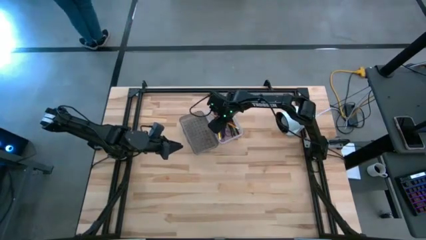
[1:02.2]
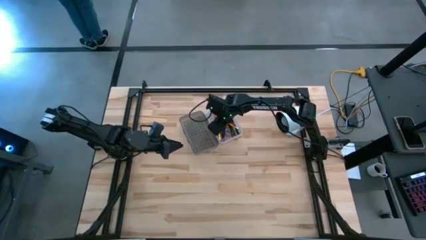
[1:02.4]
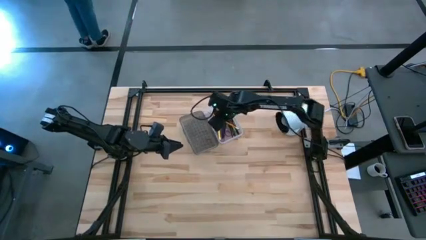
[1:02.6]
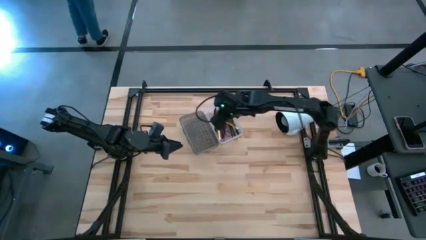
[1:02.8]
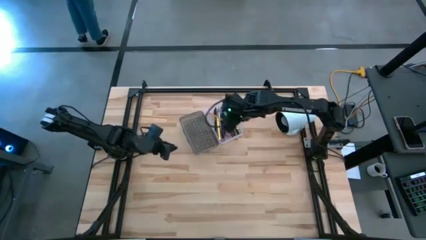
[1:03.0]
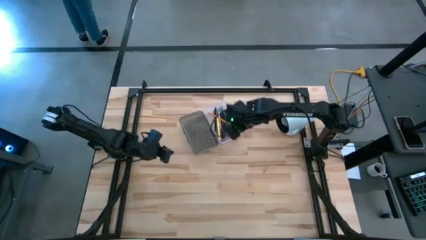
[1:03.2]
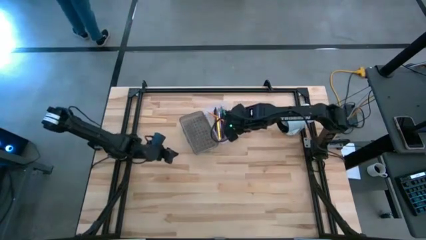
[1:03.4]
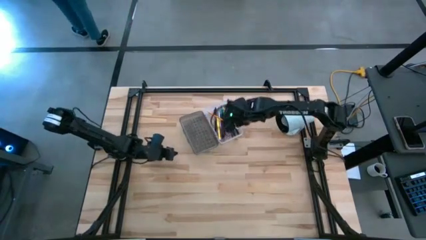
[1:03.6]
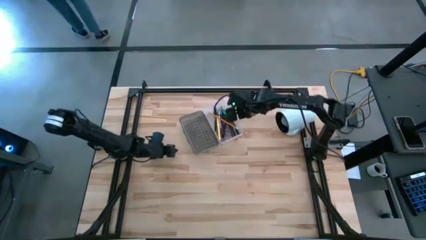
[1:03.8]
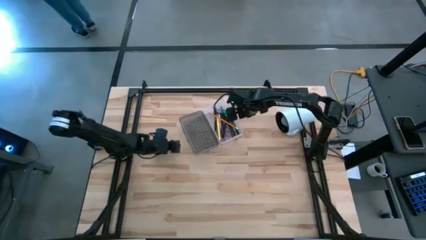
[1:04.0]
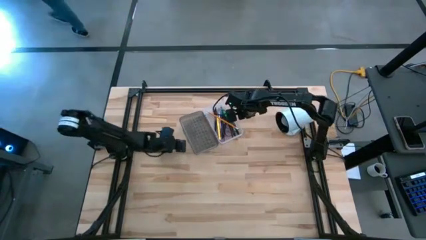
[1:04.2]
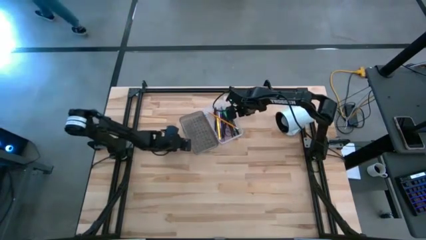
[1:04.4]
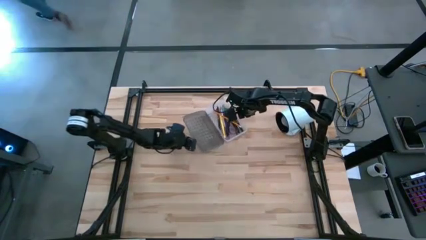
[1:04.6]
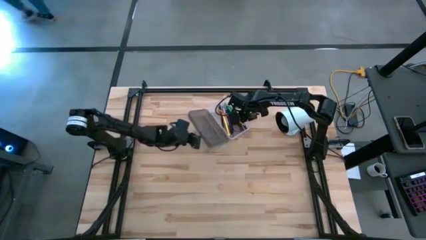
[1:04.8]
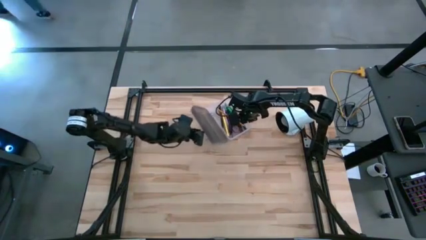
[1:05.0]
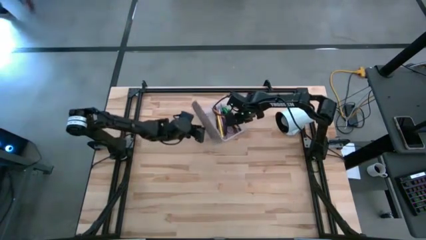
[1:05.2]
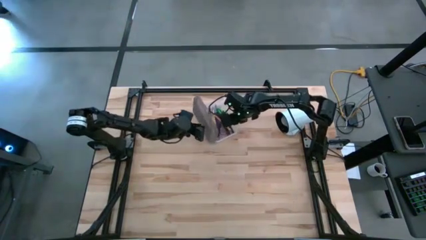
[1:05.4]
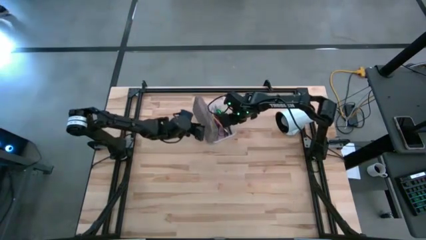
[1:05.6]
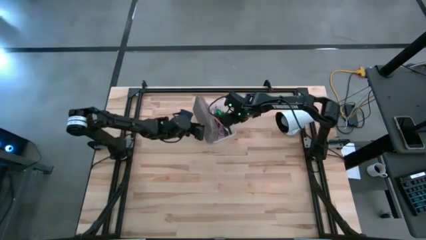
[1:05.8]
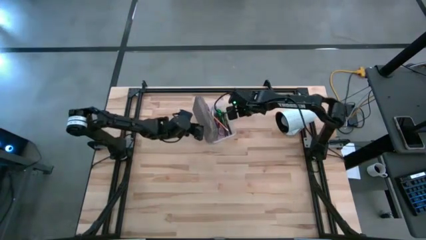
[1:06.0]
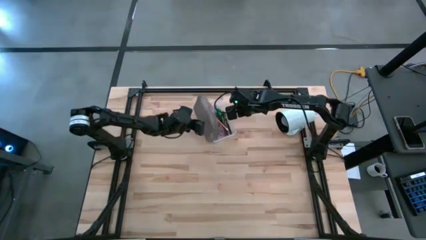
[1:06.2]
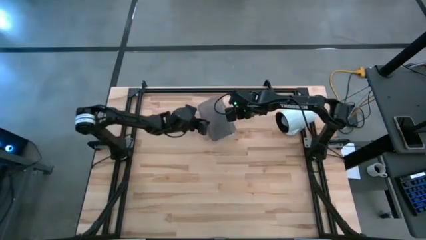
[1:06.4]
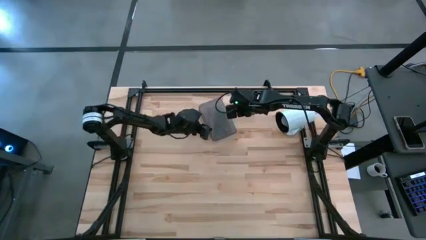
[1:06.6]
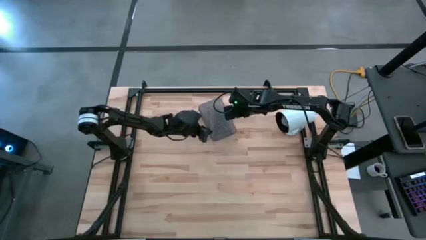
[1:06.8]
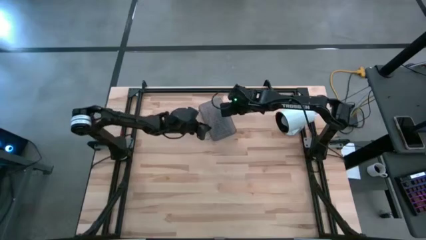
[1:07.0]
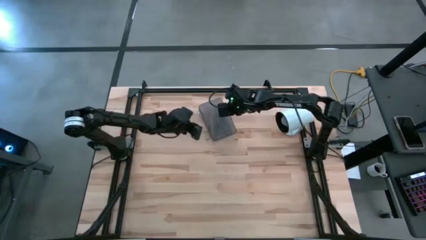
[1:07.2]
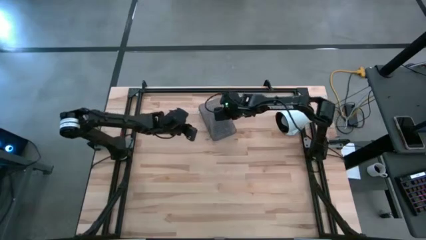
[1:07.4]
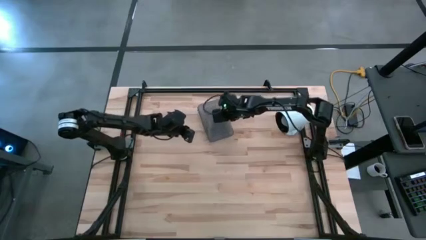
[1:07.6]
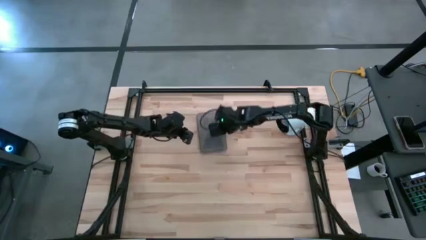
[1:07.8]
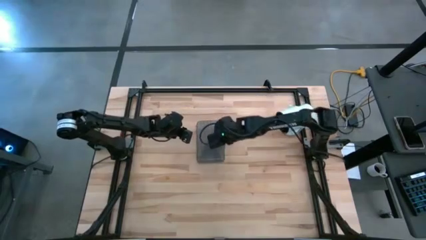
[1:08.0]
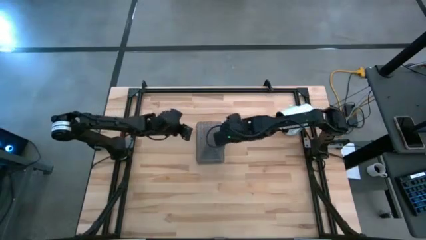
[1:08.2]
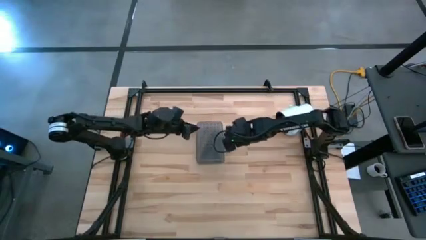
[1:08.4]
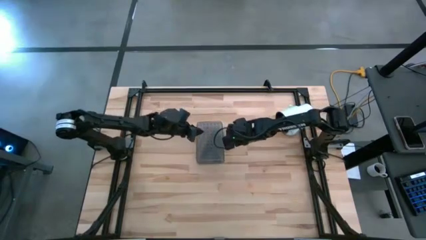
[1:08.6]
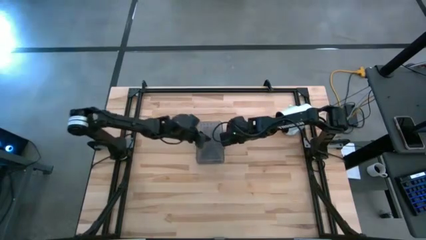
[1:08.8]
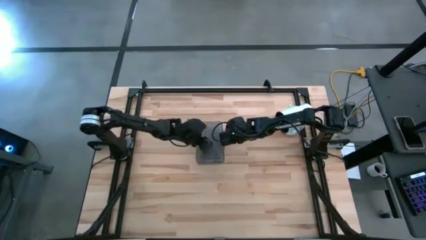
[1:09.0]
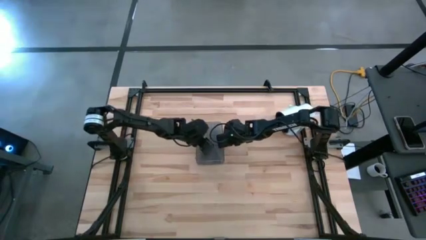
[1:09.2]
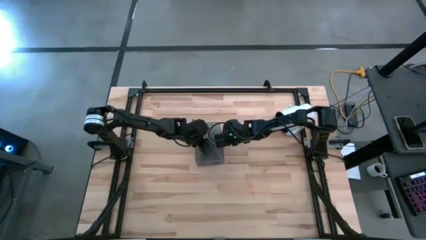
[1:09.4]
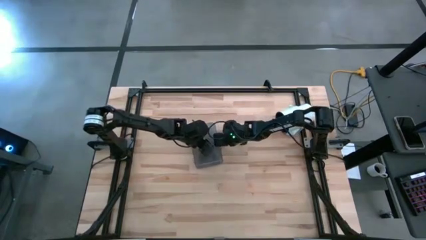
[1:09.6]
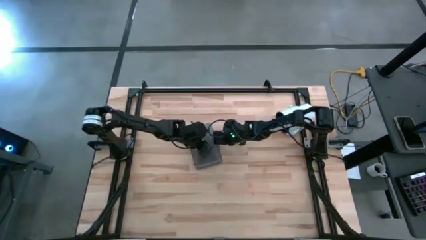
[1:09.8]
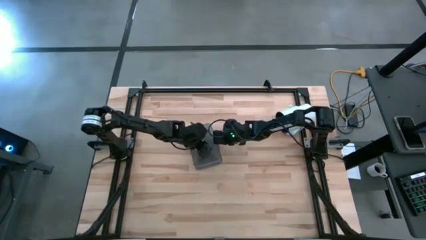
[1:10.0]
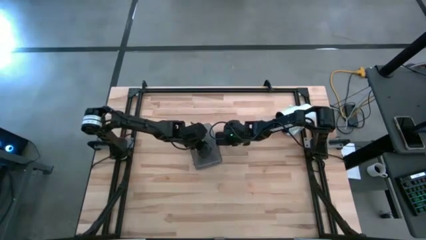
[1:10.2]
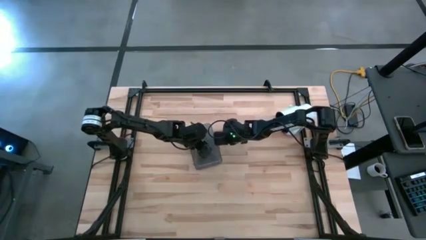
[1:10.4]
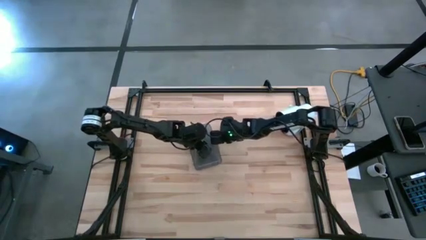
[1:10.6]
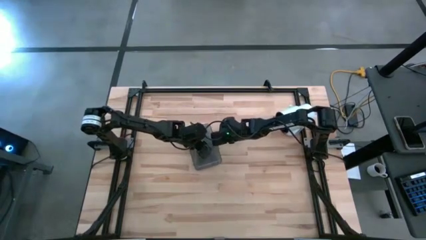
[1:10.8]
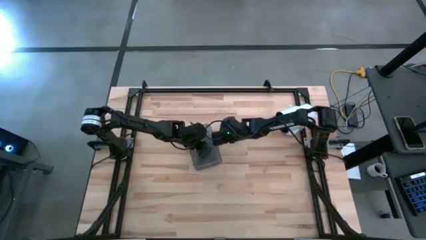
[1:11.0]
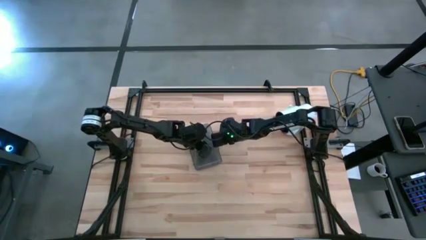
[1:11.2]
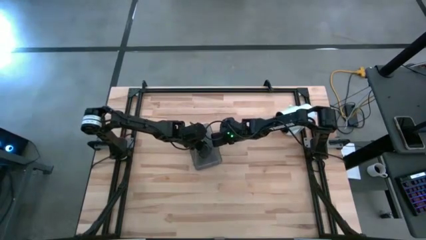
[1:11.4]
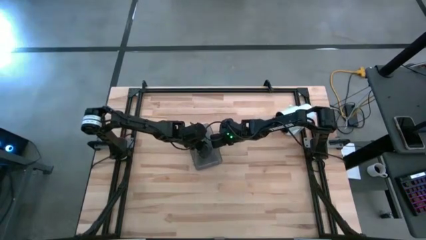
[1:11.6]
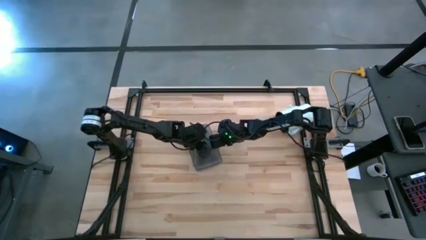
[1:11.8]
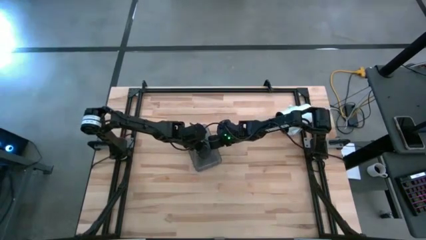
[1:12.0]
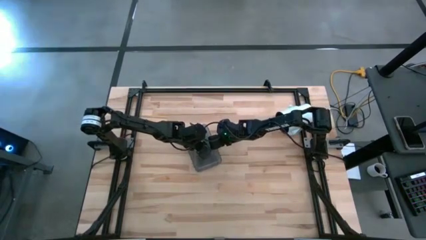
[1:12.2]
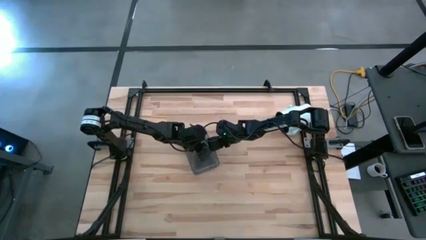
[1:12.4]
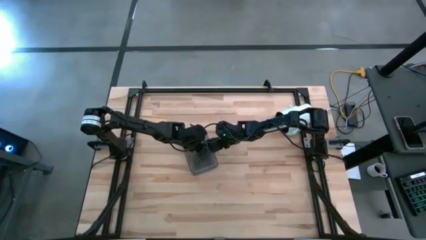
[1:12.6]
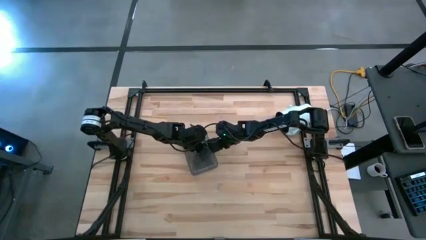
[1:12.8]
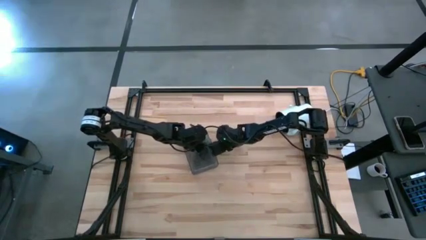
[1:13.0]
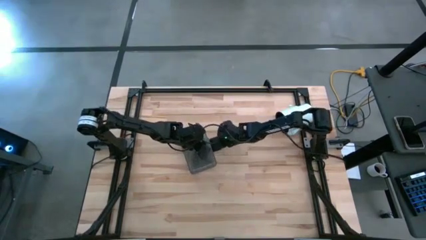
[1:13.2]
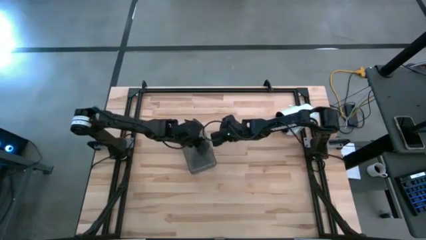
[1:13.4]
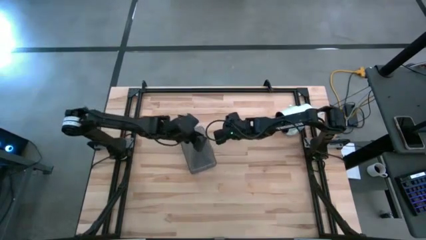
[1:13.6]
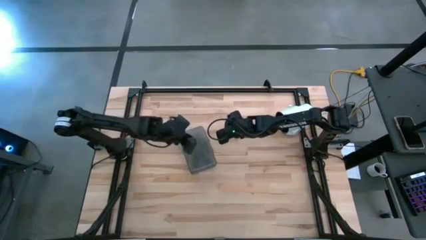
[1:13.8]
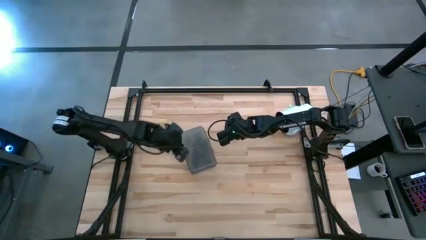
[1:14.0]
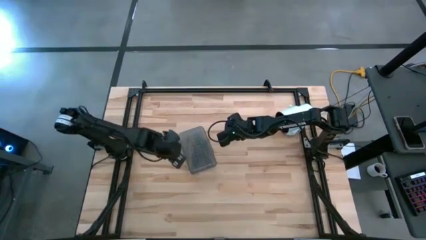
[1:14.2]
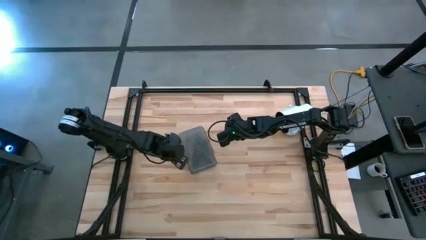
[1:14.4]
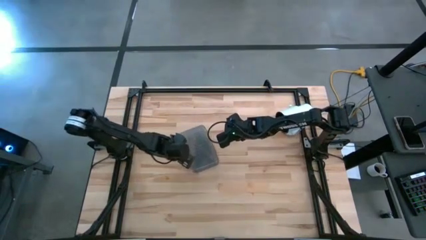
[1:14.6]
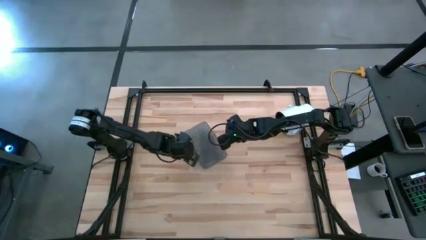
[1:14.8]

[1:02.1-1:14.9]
Task: Pick & place school supplies into a supply box
Close the black supply box
